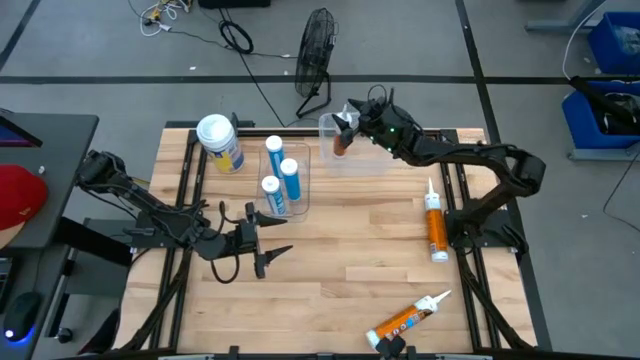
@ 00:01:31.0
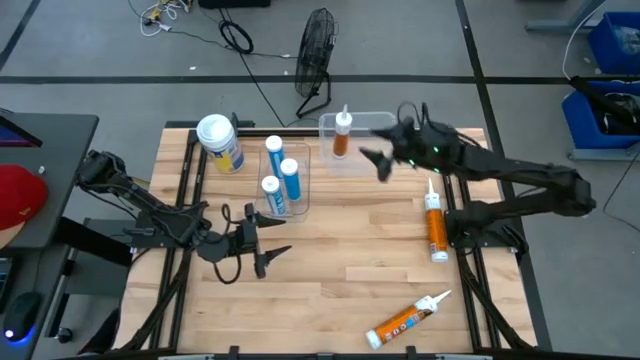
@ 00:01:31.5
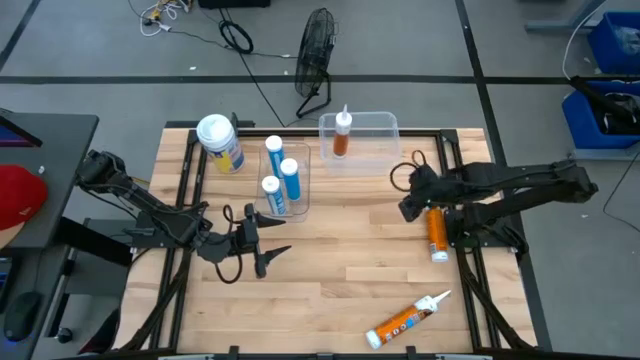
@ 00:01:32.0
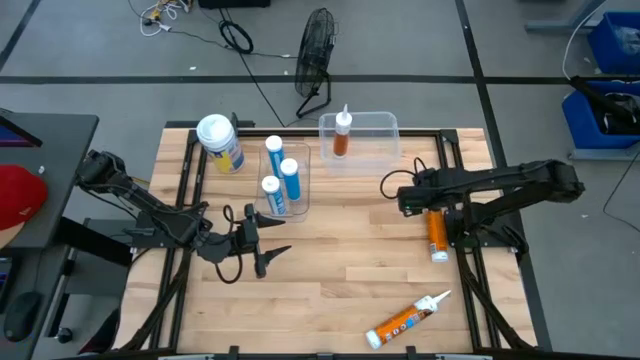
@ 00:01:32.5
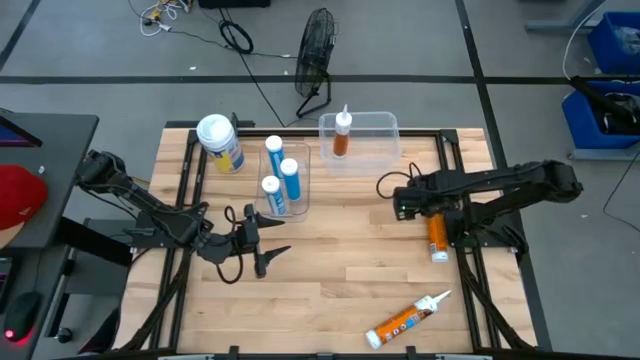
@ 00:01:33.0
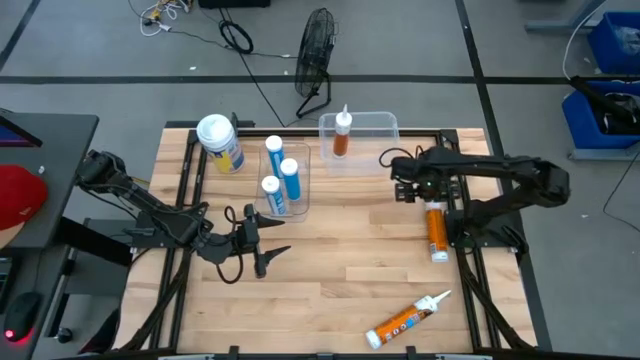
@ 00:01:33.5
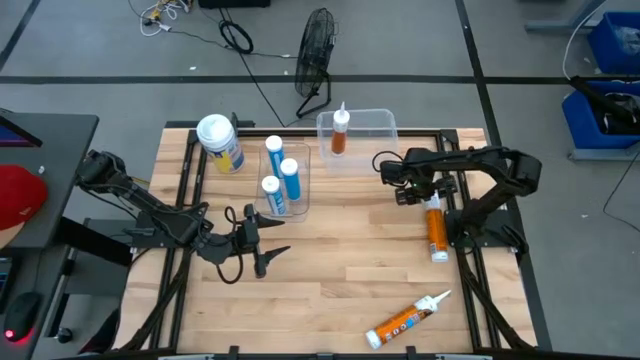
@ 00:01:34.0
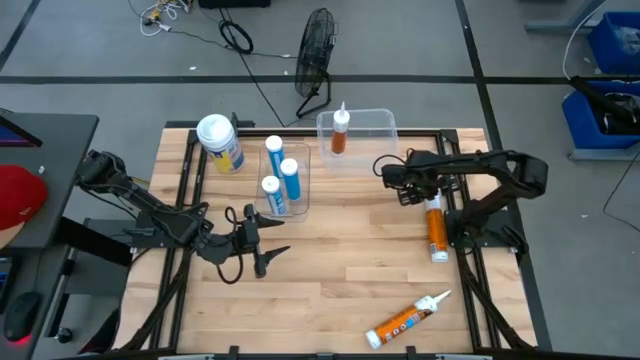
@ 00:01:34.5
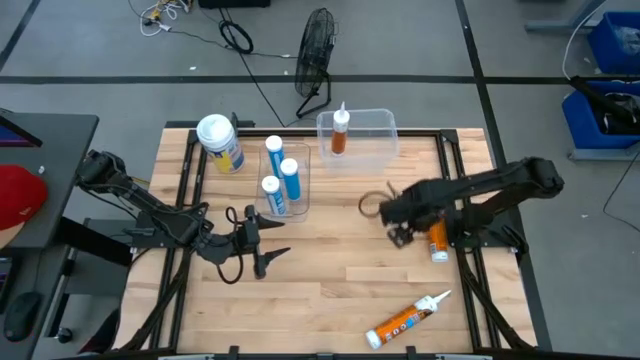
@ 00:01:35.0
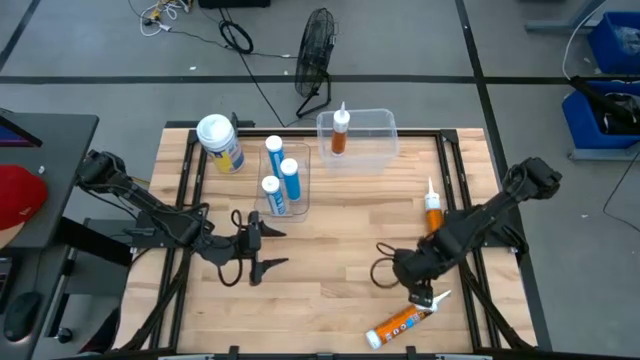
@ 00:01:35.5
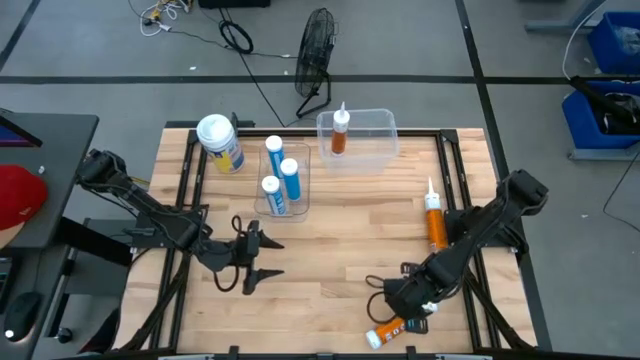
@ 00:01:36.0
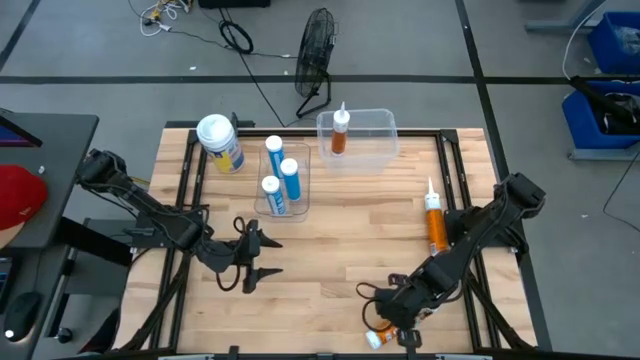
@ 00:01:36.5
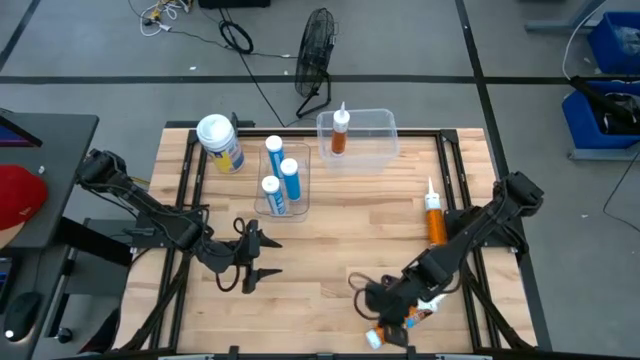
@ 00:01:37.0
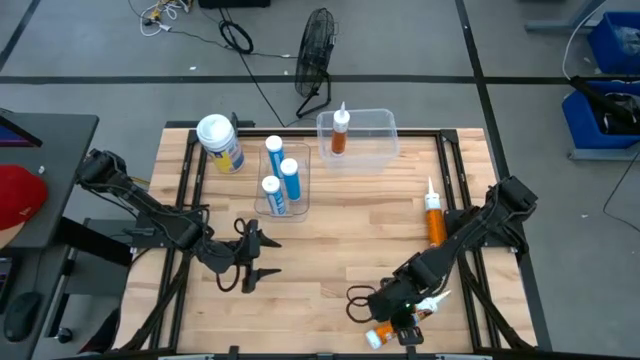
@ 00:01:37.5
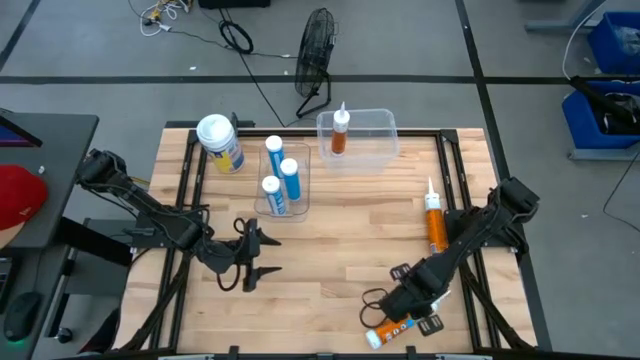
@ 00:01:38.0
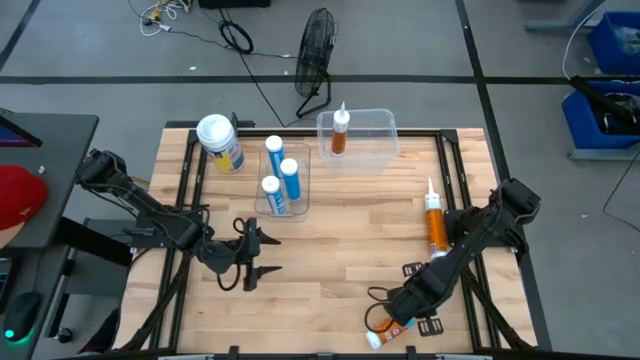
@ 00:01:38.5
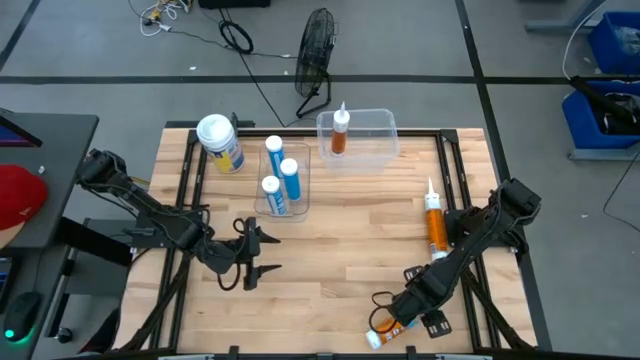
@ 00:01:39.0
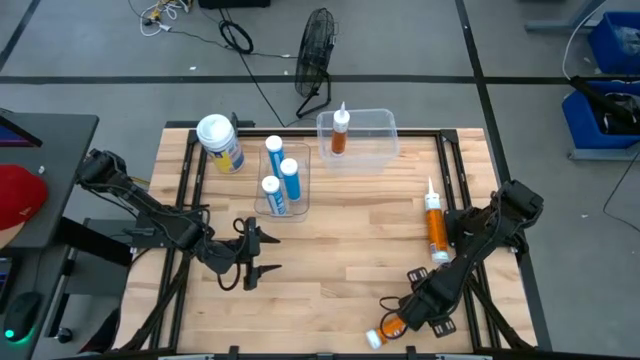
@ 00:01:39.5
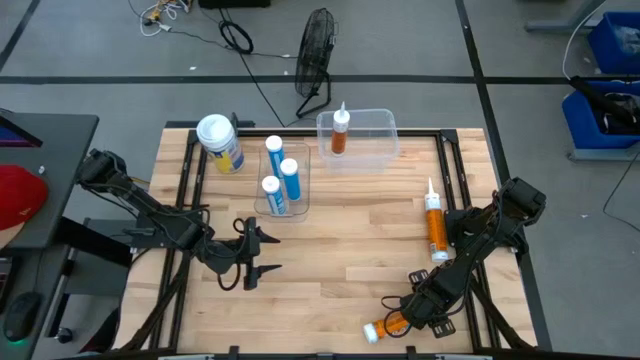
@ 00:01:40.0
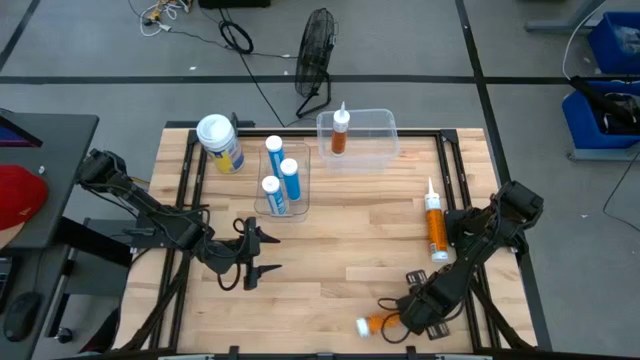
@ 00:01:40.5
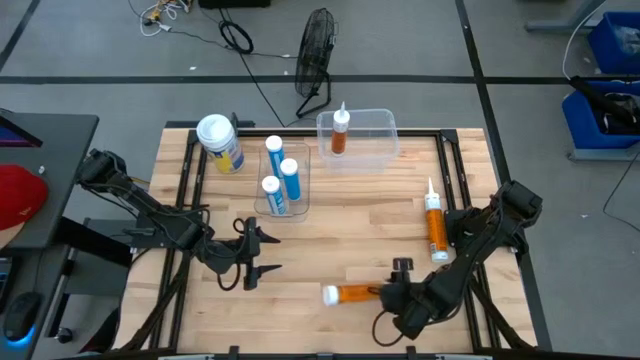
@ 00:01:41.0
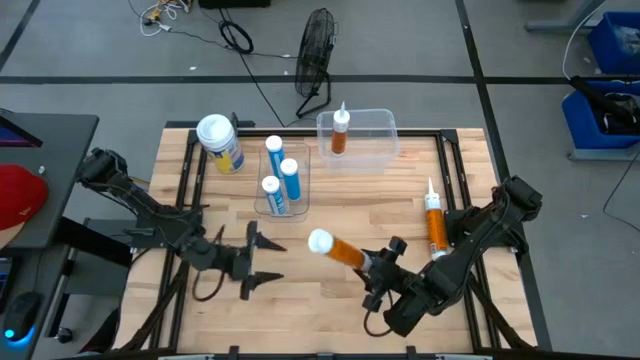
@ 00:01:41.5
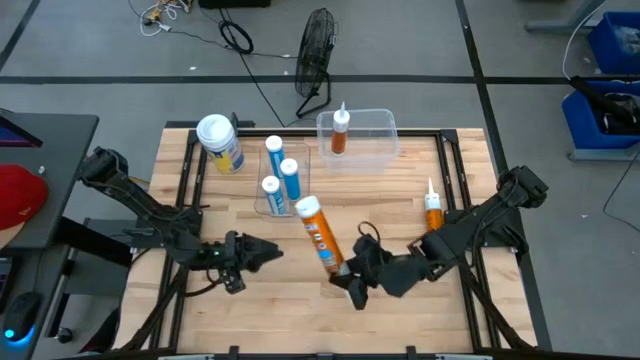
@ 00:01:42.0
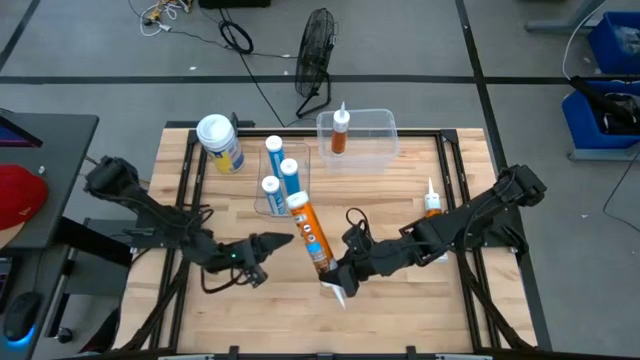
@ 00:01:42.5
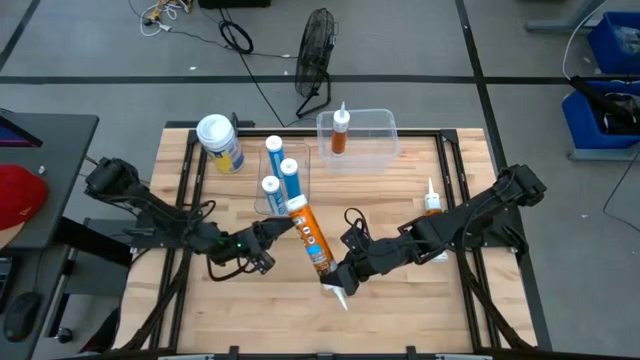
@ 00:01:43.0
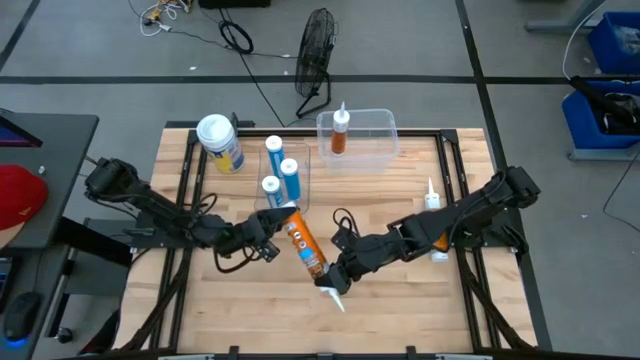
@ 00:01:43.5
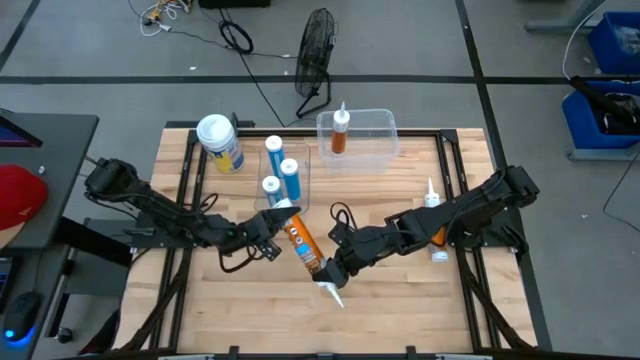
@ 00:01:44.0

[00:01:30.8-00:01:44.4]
Task: Pick & place silicon tubes, Sealant and Lysol wipes
Put the bottom orange sealant into the right transparent bin

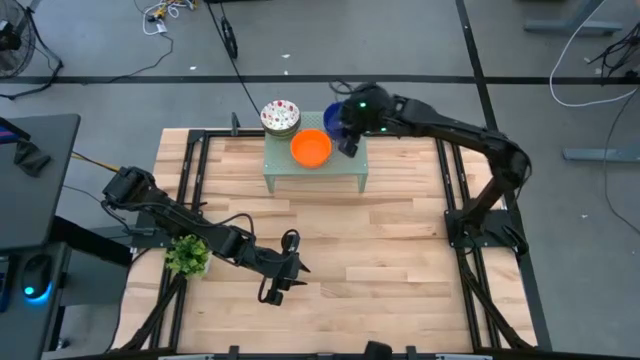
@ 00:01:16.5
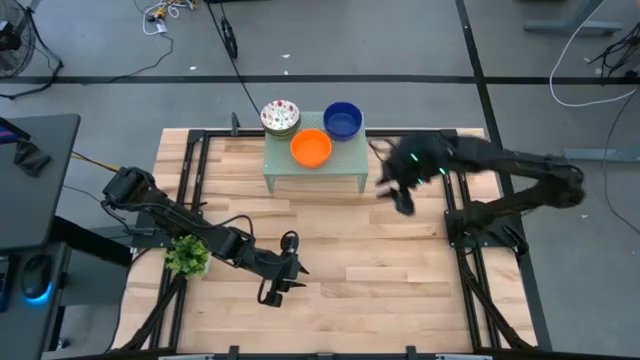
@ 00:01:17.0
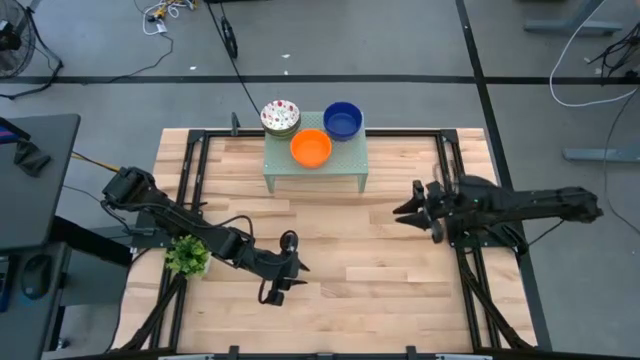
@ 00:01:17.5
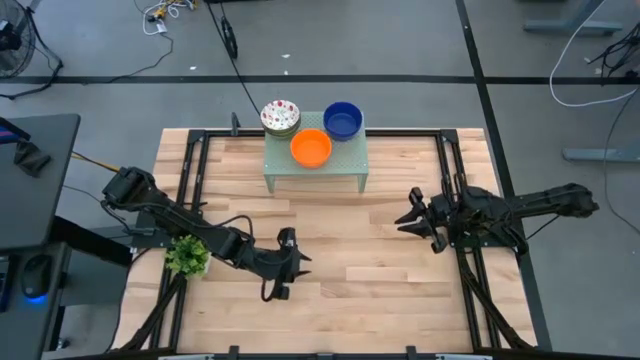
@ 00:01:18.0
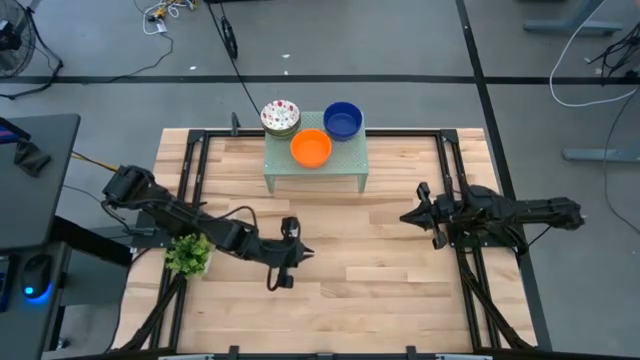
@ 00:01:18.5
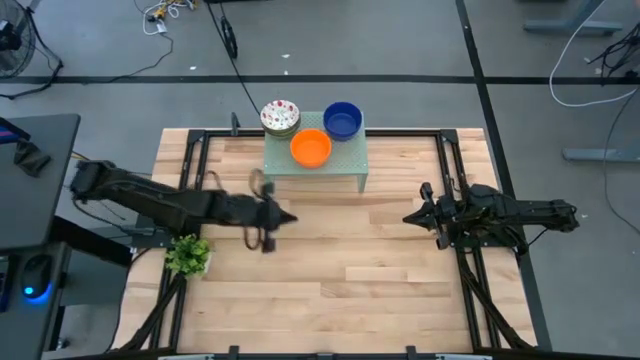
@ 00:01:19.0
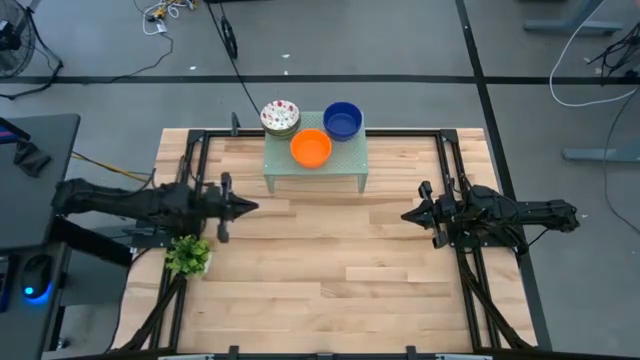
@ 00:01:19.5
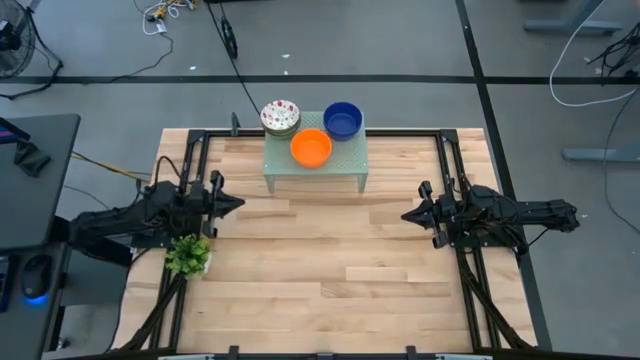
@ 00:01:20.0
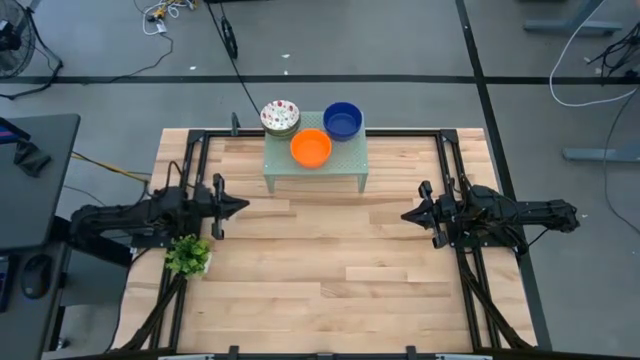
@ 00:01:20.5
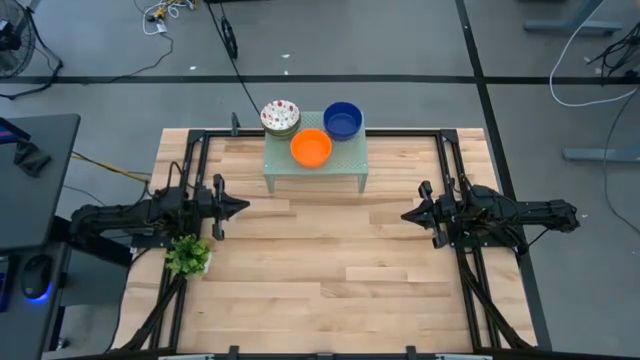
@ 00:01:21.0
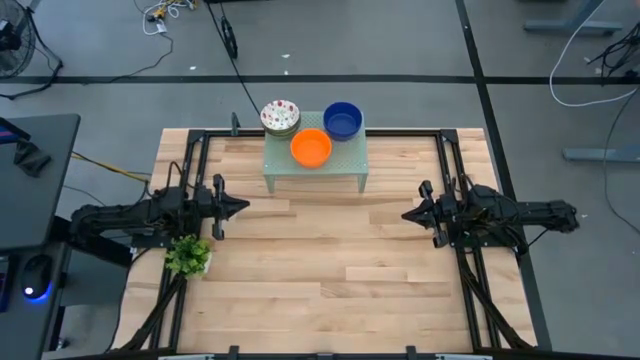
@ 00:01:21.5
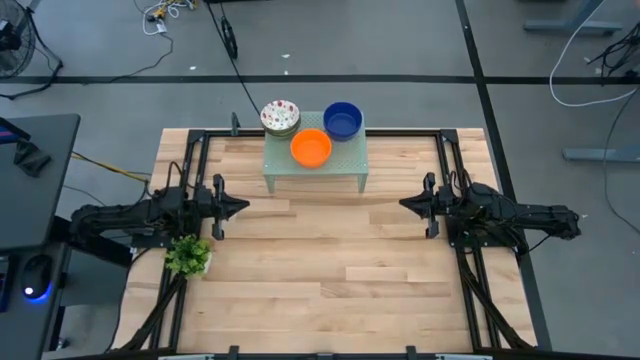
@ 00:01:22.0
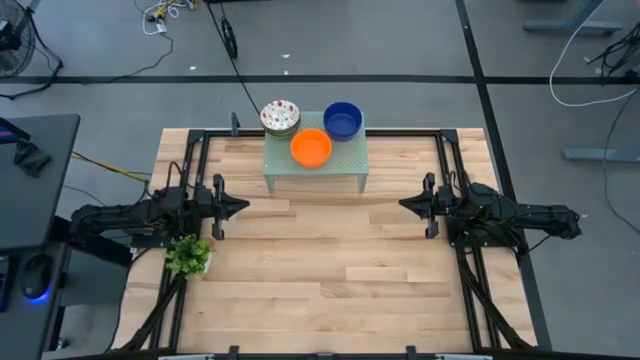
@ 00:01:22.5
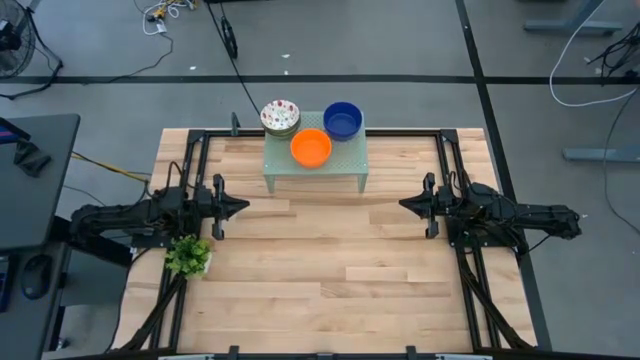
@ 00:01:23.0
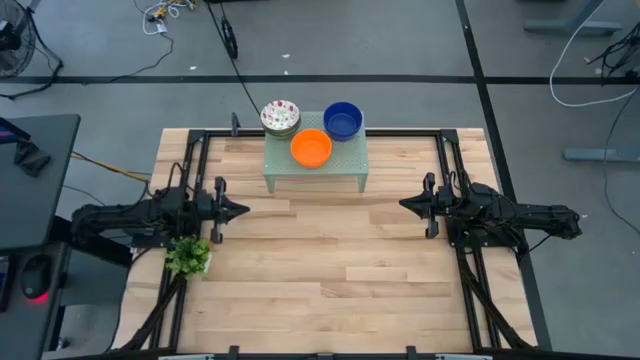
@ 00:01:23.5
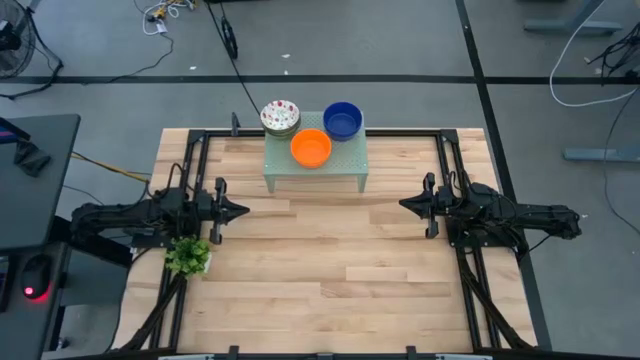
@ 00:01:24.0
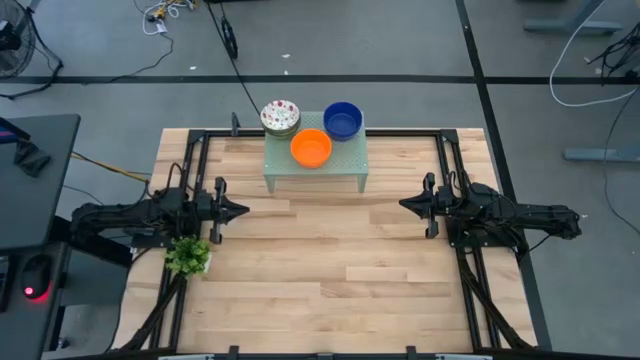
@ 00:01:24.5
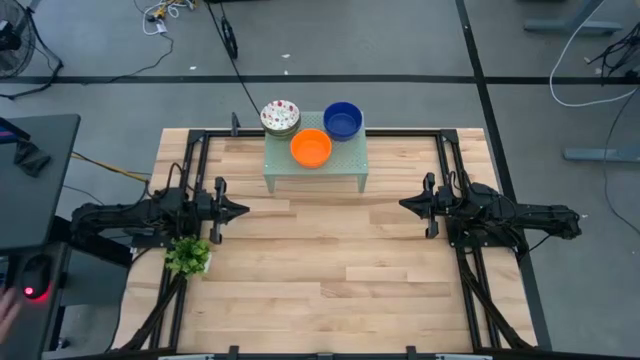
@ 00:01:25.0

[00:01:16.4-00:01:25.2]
Task: Pick & Place Mini bowls
Return to Home Position
